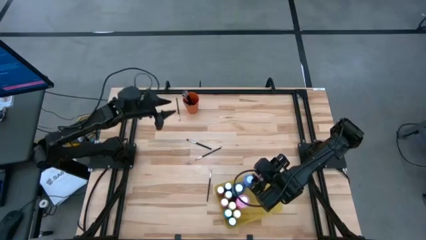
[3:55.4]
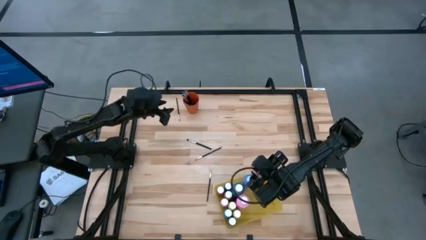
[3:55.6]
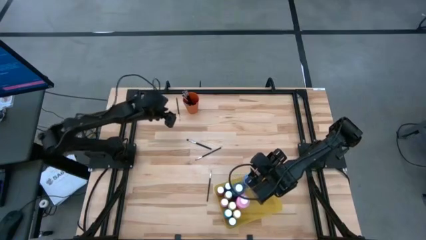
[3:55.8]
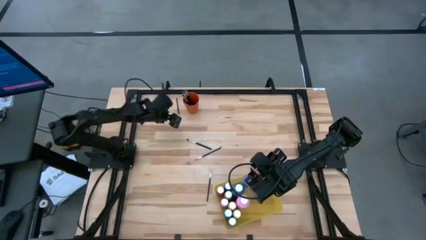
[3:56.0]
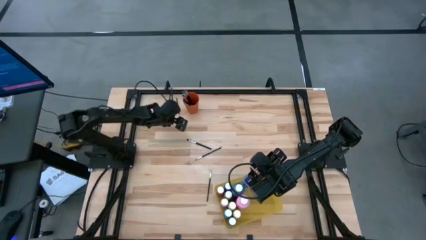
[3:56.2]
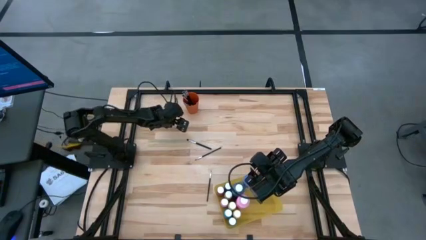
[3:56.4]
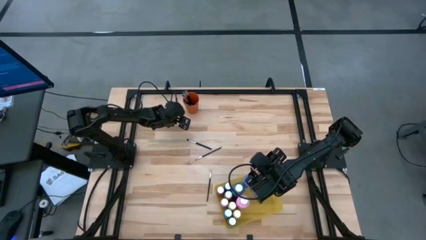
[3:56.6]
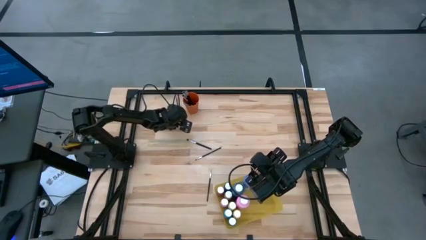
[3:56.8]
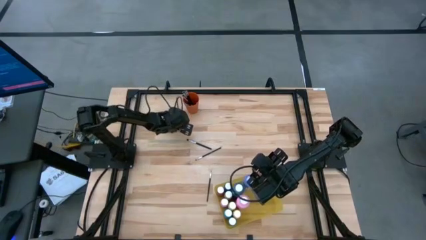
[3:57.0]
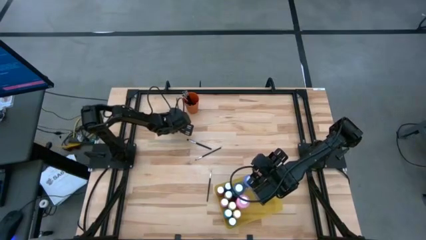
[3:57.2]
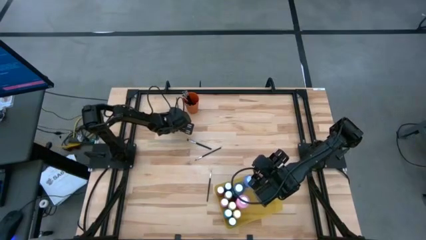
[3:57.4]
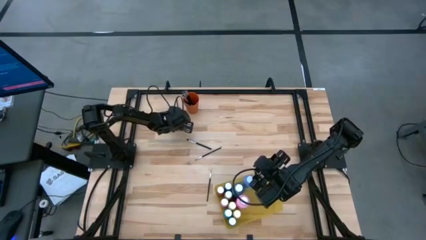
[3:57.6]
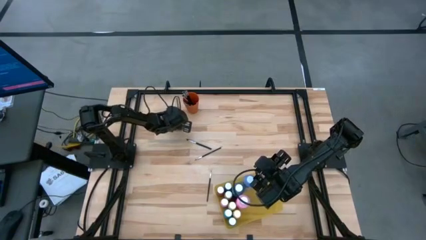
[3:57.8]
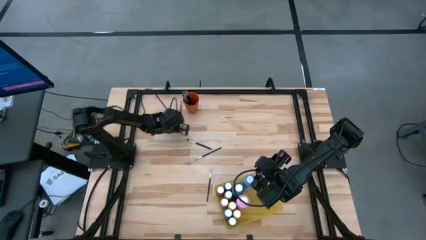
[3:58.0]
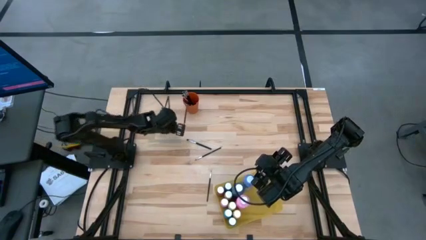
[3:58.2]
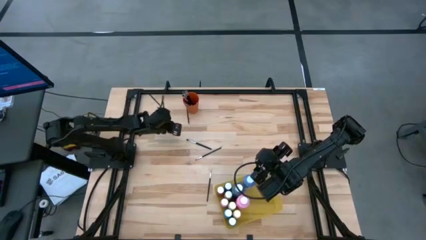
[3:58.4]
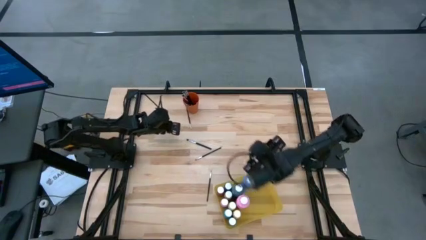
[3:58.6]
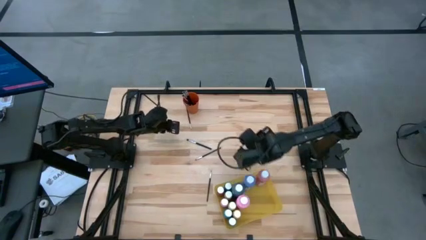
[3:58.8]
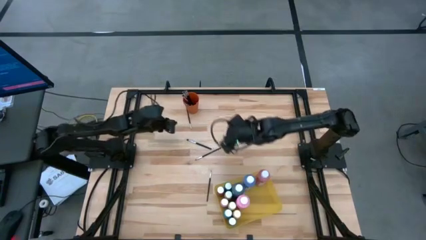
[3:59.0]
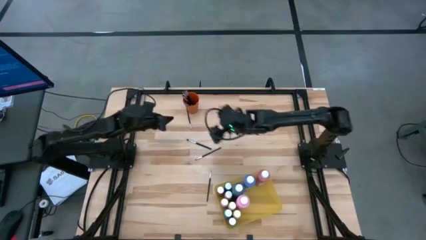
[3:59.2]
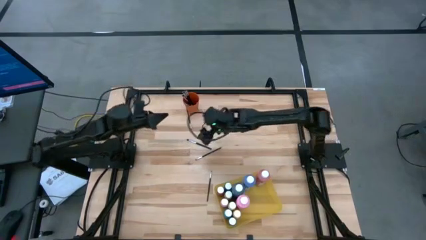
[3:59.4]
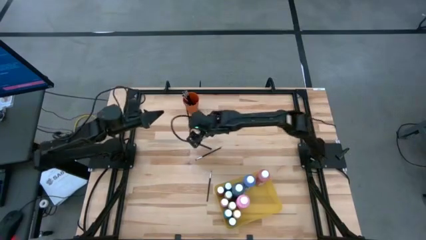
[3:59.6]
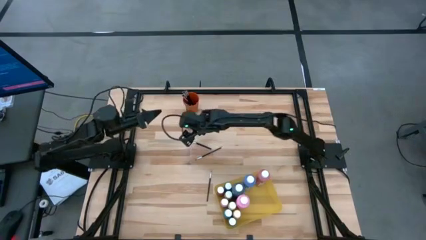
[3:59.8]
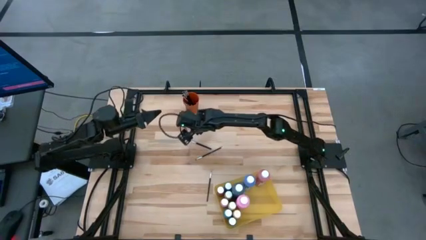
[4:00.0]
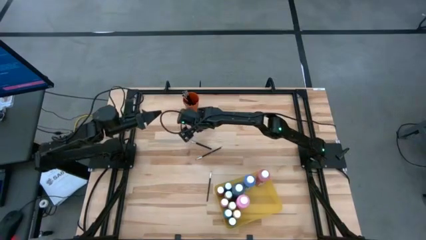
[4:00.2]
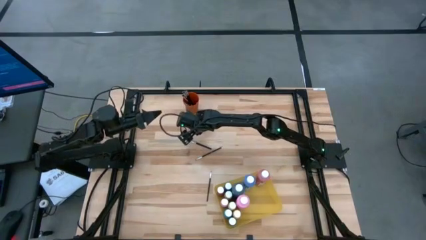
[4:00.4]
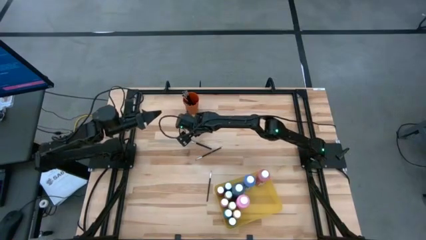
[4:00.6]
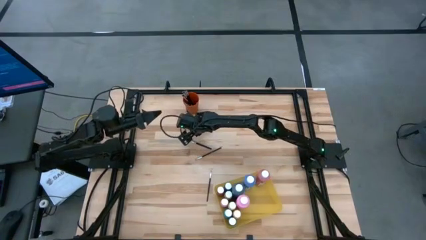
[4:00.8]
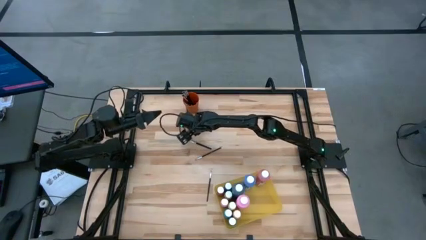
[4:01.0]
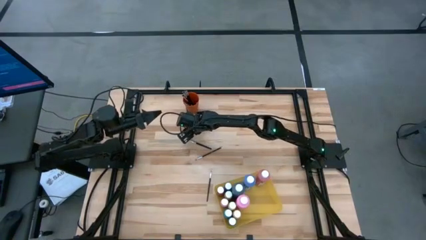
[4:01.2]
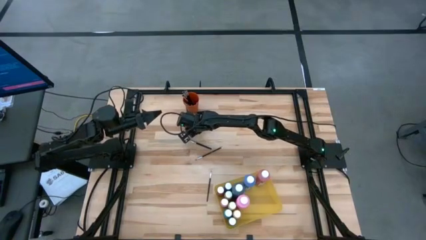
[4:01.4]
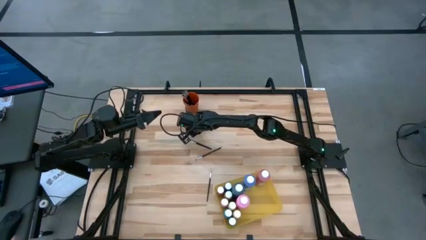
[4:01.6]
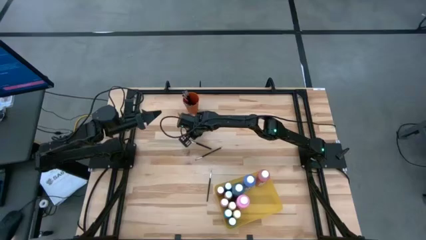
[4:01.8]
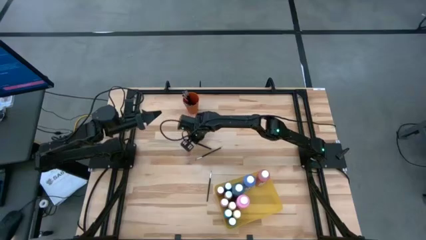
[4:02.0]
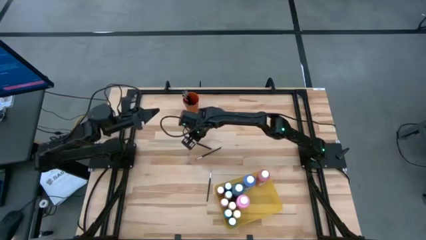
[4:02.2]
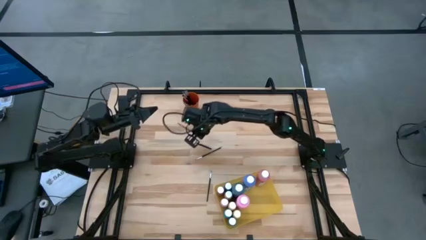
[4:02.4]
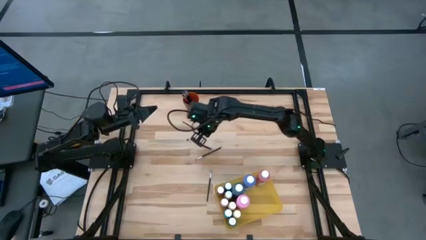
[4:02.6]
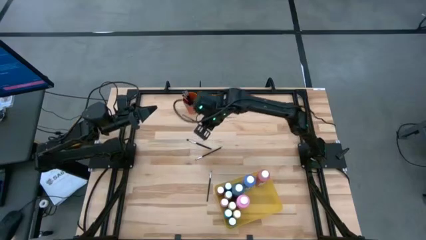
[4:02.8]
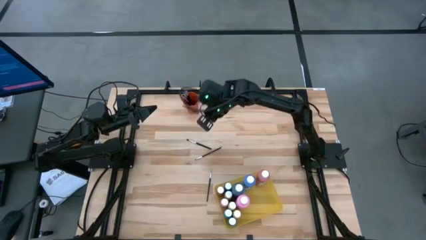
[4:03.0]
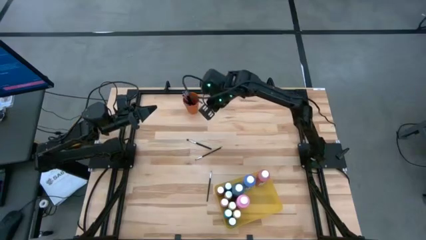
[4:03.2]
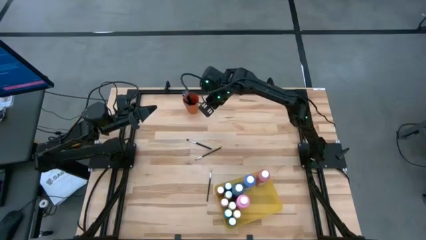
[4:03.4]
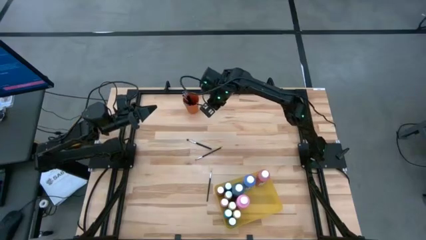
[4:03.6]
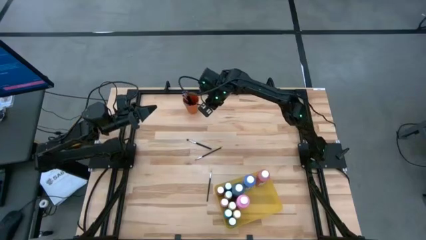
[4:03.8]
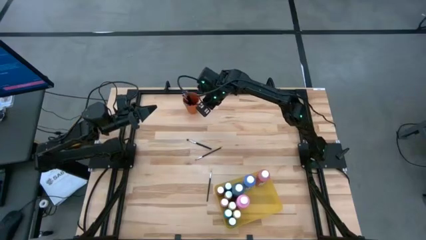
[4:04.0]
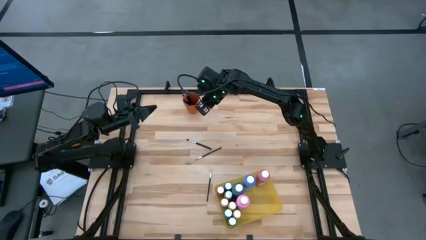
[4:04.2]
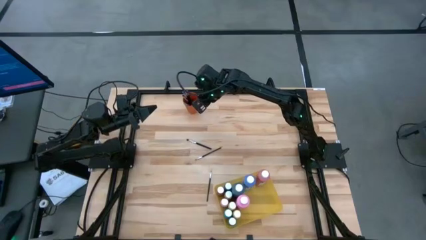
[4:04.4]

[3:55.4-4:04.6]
Task: Pick & Place Paint Supplies
Put the black paint brush into the orange cup

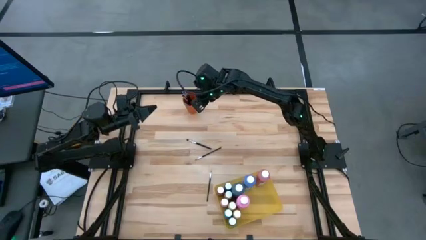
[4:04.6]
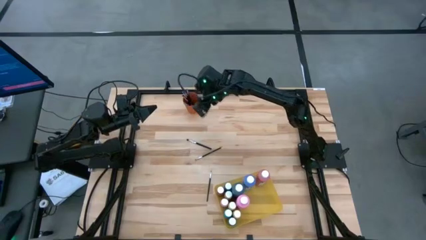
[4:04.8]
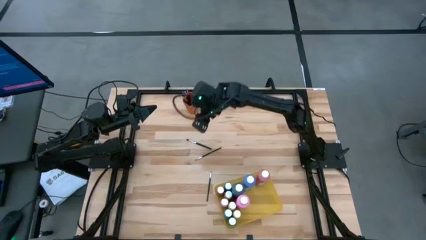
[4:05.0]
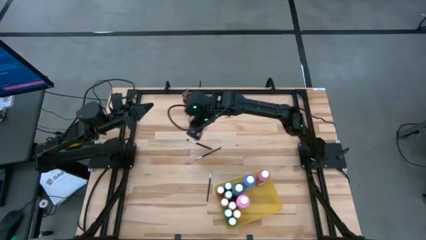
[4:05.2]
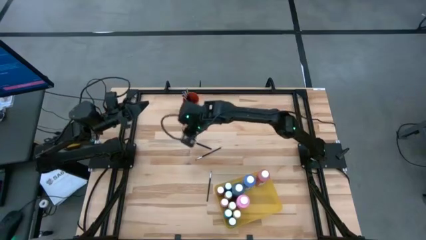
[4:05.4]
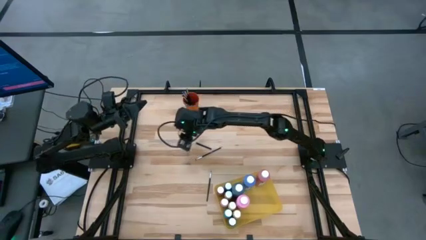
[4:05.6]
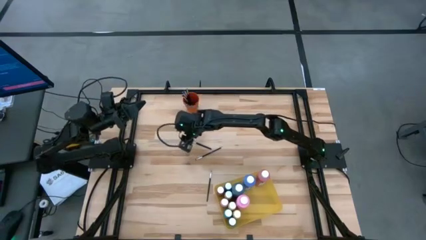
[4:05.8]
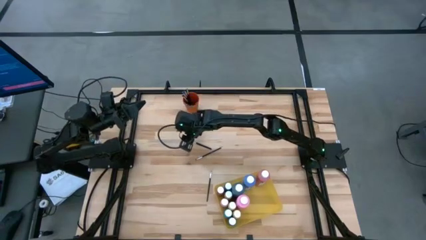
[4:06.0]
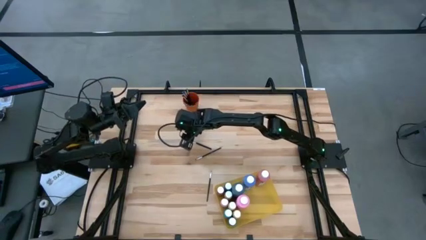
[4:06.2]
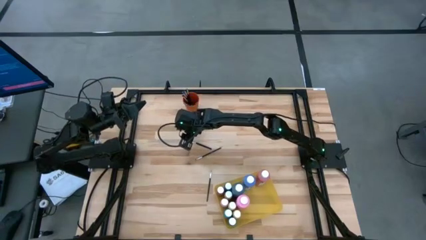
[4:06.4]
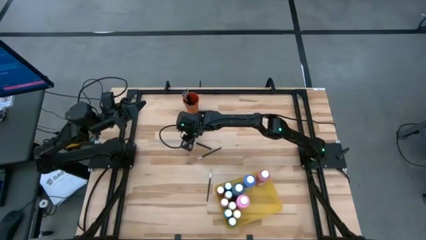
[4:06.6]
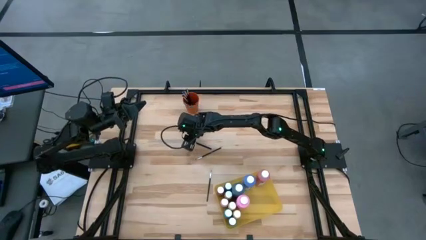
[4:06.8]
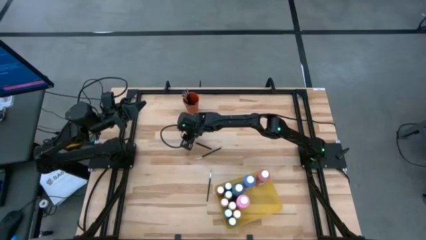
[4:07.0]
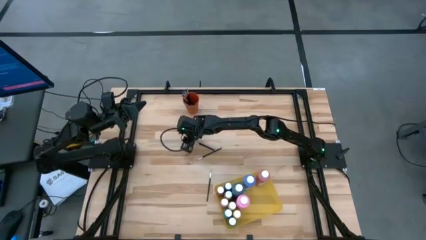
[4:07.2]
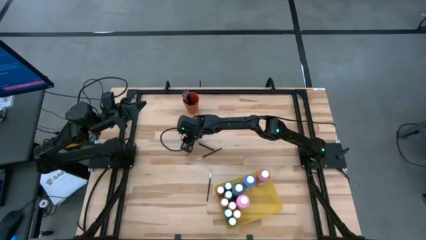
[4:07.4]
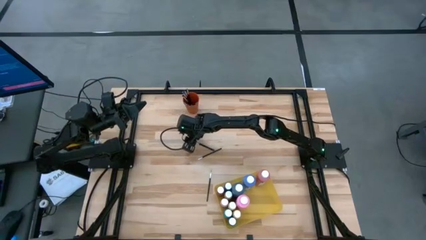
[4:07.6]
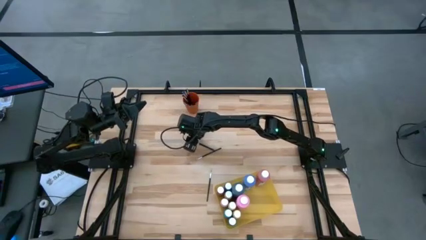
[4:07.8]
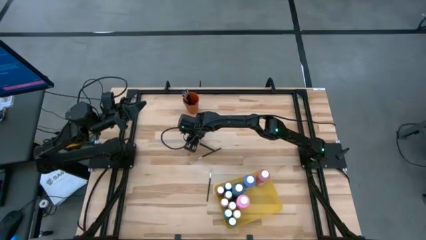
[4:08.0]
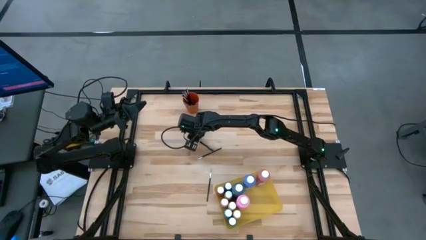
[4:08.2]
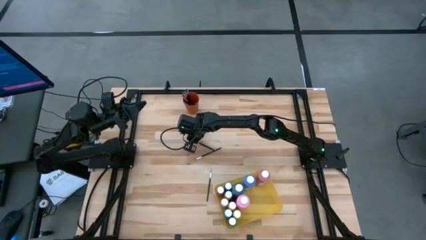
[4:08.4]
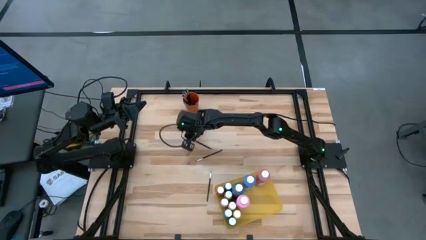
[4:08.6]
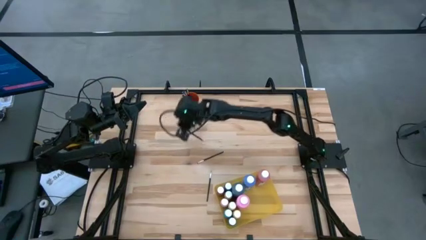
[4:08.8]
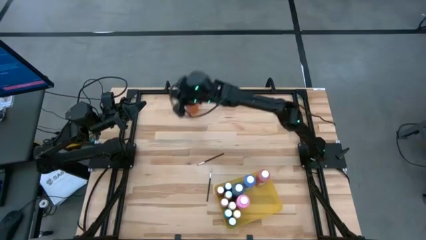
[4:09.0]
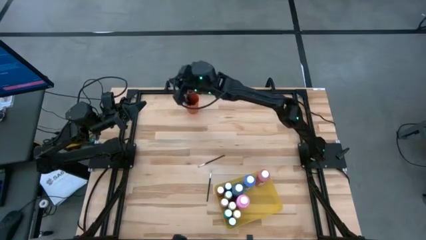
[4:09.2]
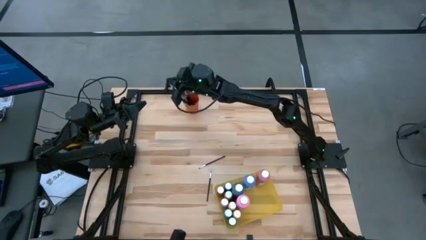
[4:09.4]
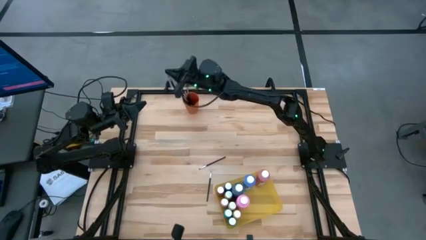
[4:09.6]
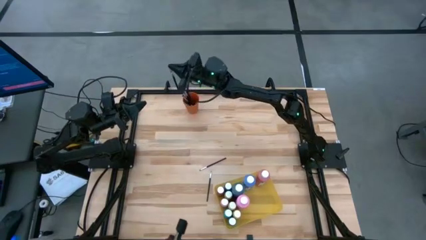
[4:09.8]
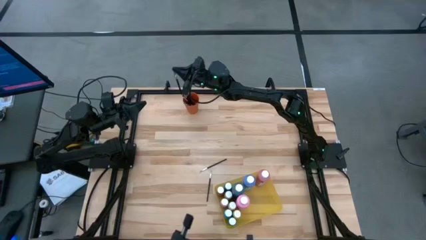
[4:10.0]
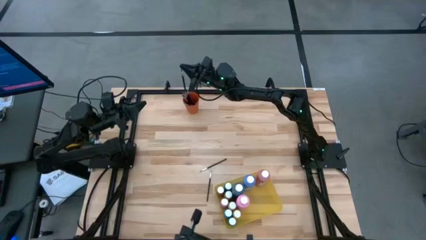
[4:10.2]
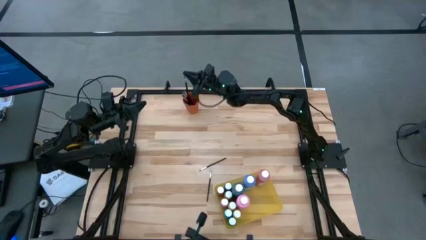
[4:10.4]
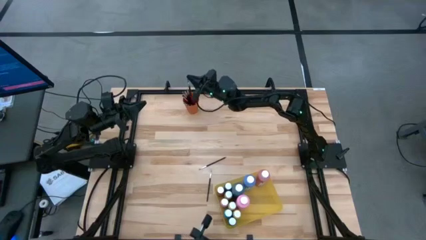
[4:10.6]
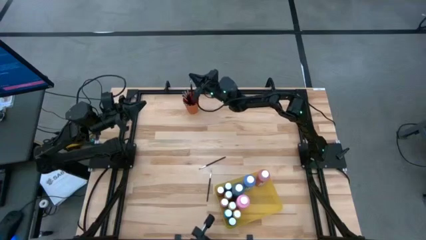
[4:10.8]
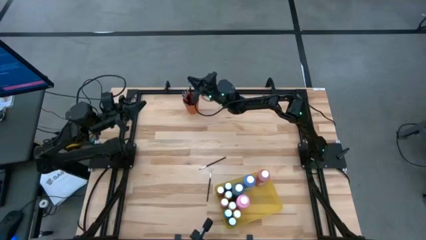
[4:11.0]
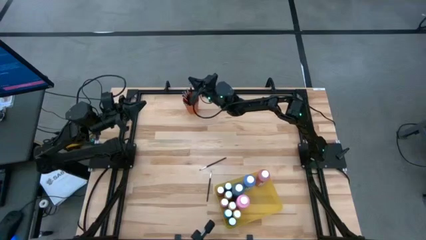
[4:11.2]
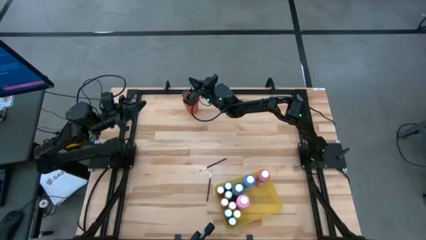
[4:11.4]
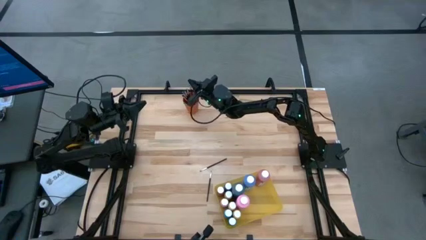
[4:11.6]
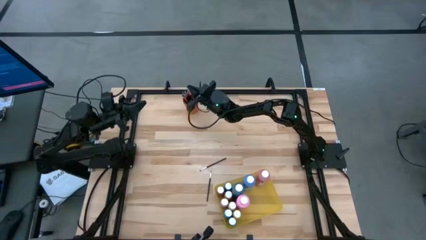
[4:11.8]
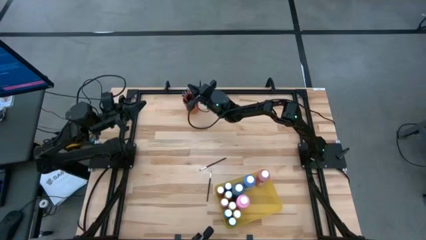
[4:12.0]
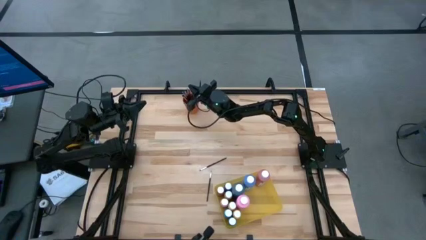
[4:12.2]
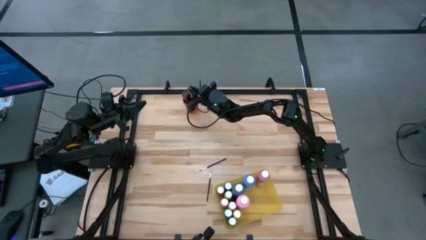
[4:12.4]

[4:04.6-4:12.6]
Put the black paint brush into the orange cup
